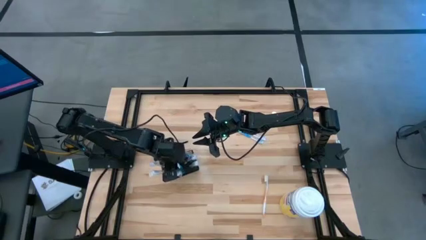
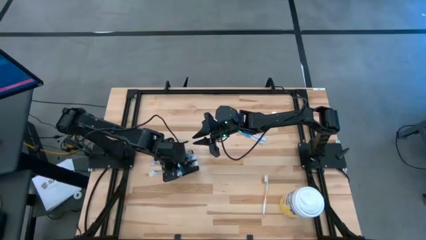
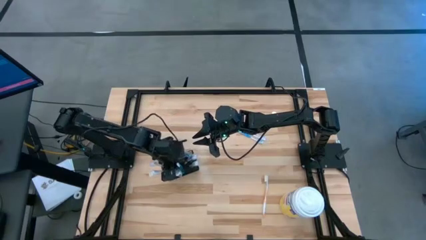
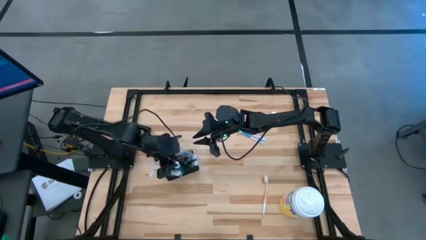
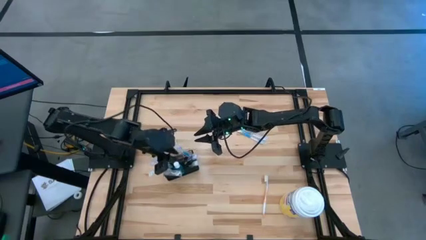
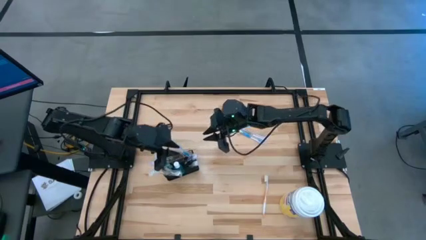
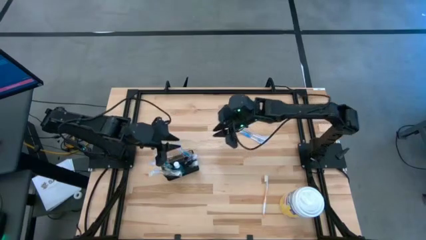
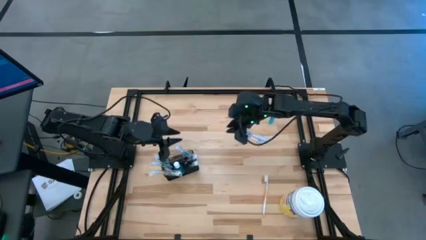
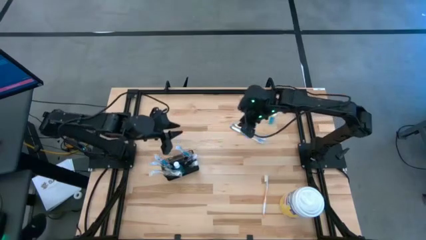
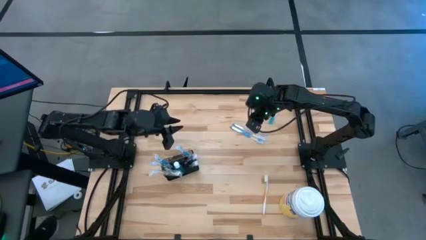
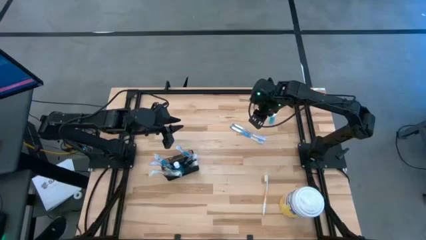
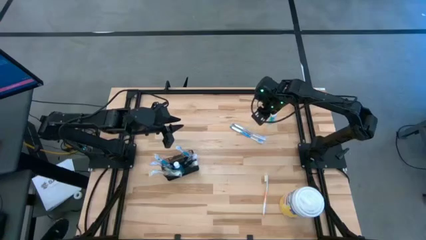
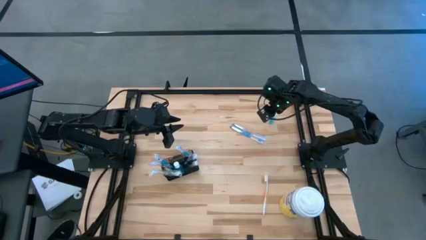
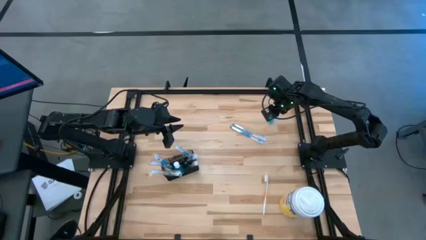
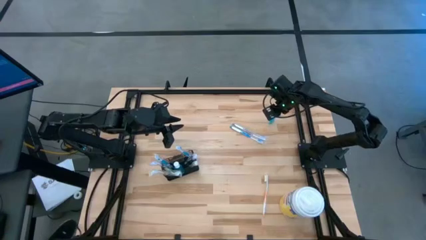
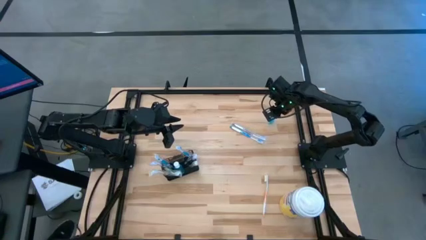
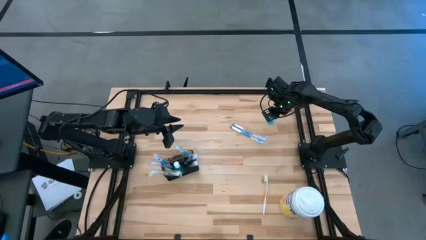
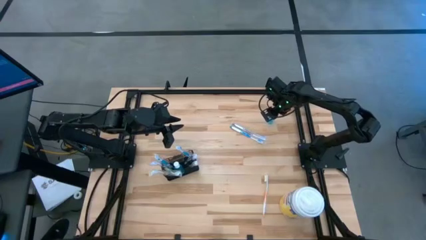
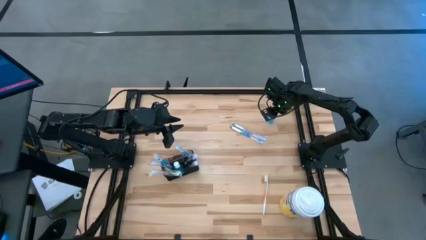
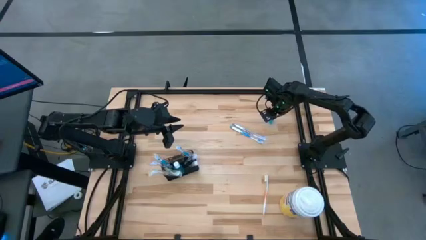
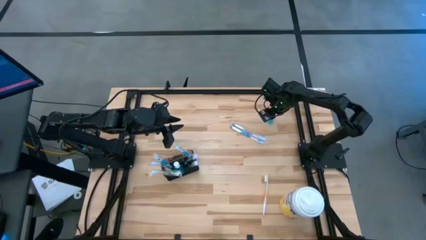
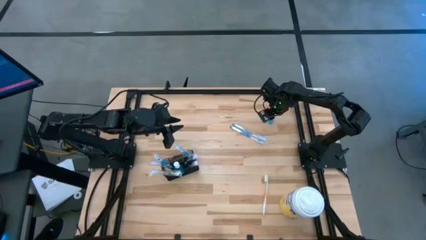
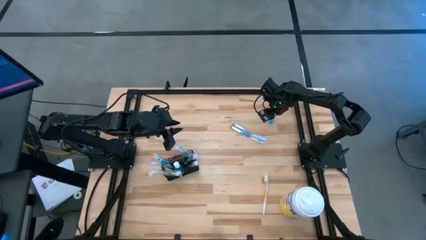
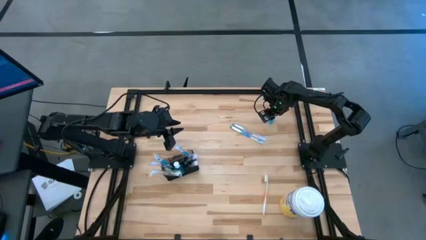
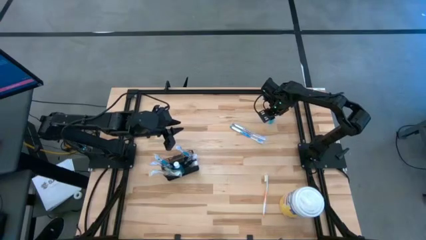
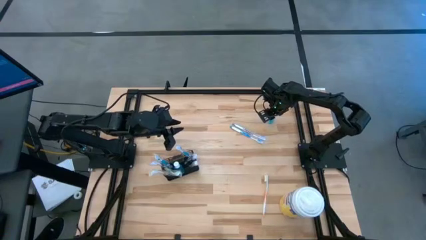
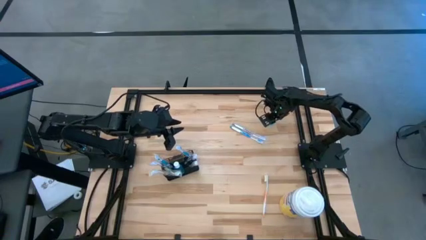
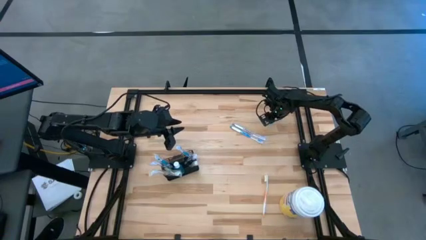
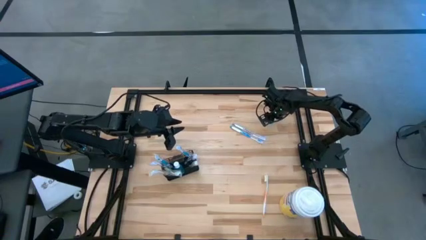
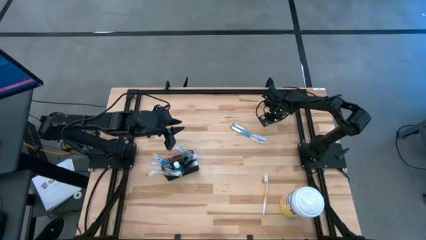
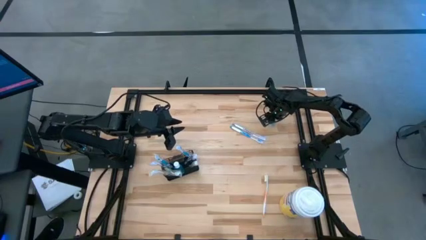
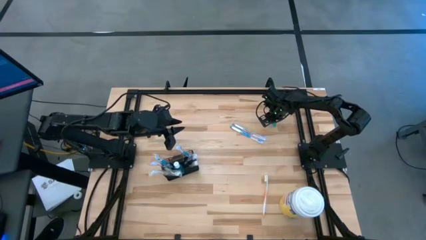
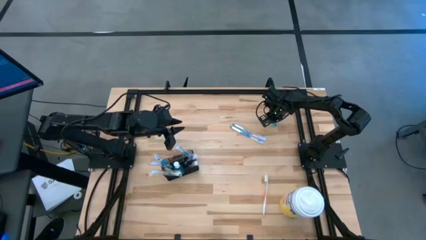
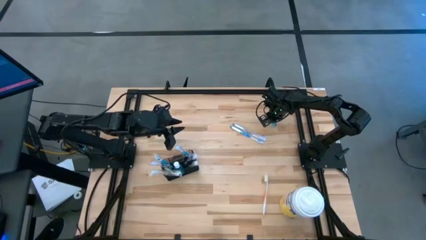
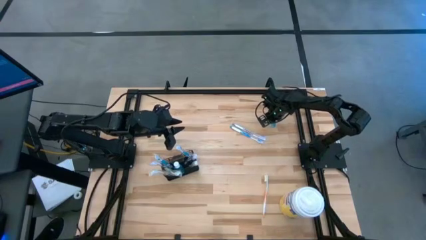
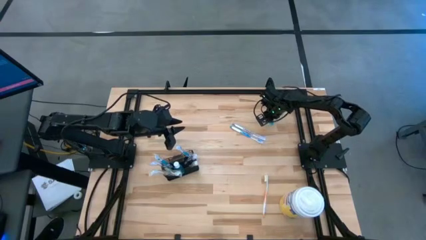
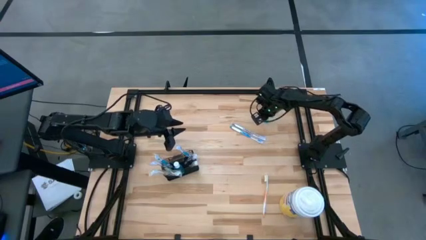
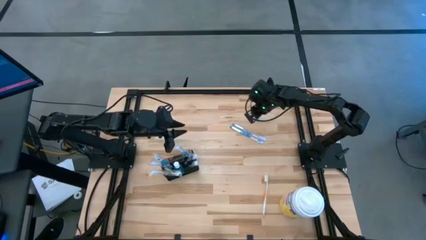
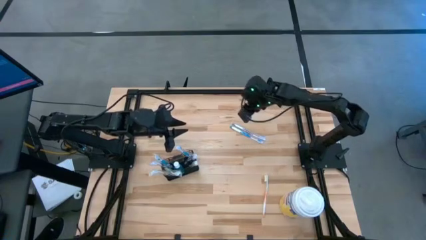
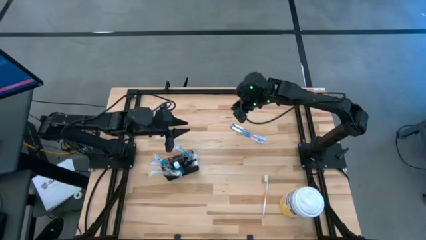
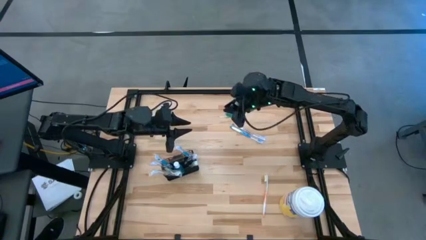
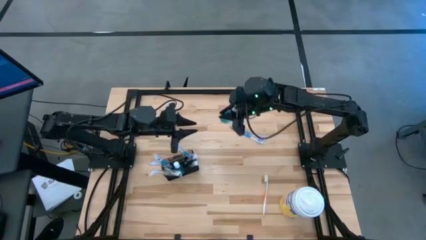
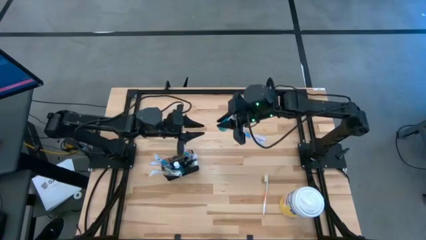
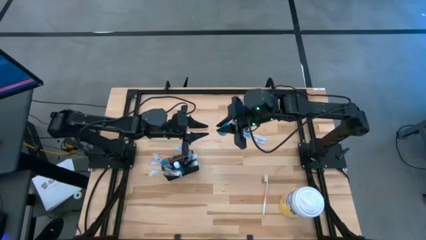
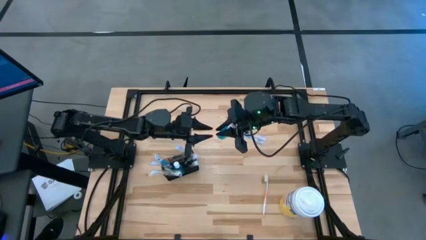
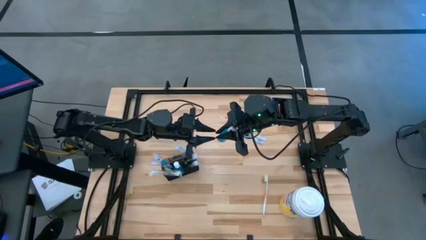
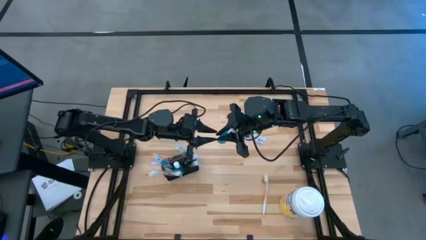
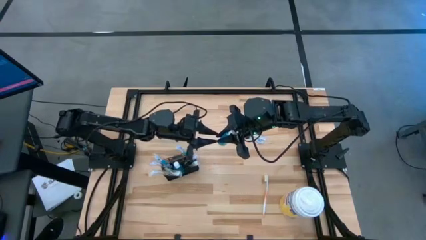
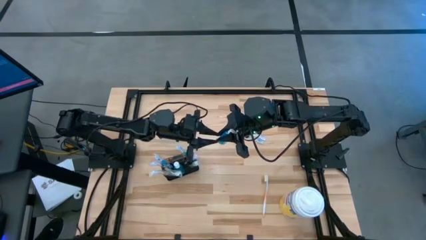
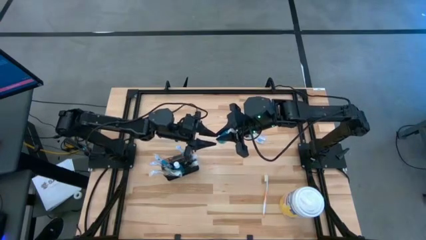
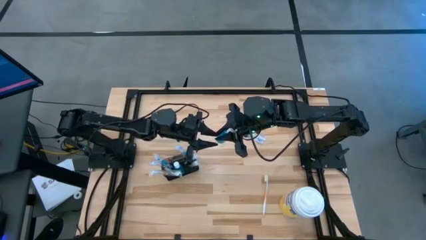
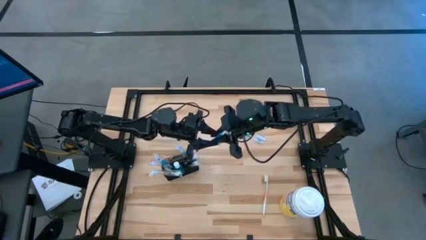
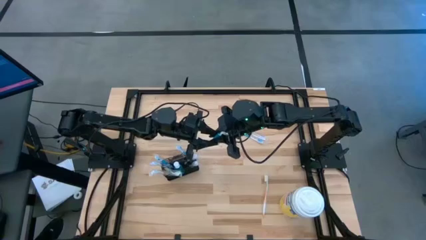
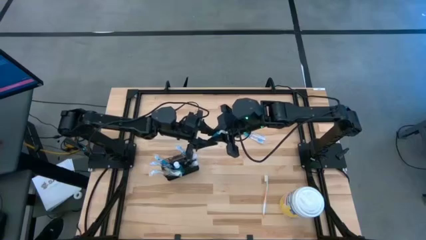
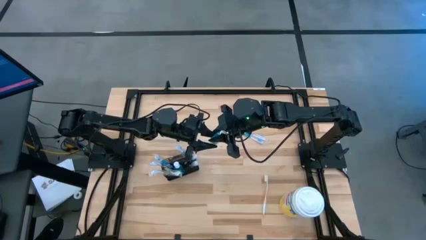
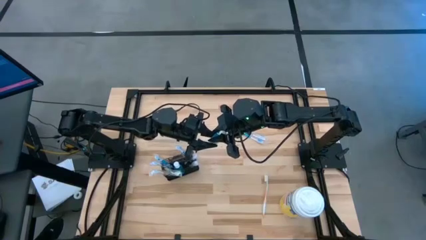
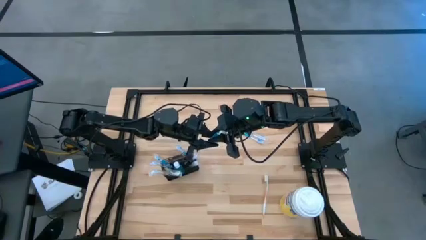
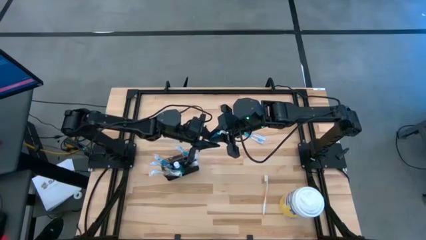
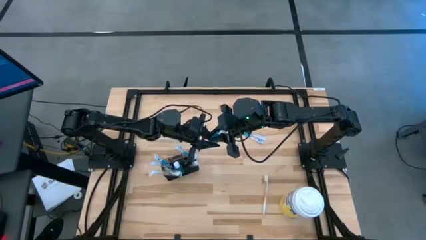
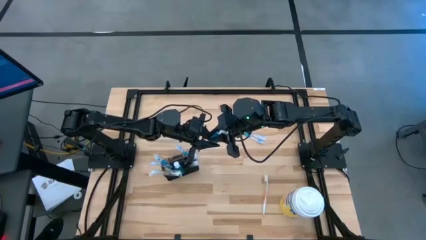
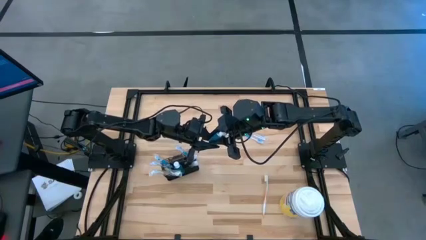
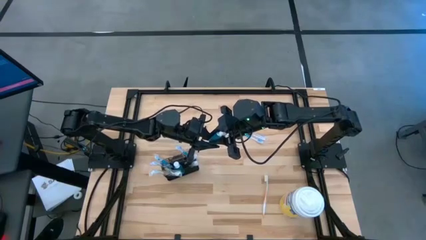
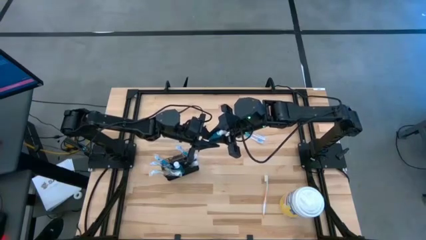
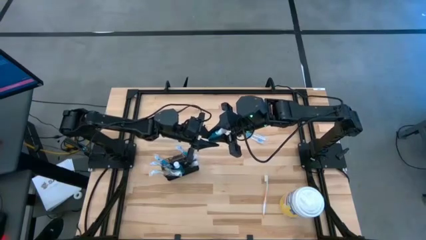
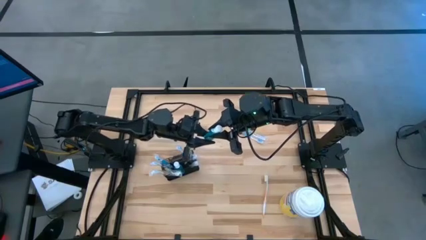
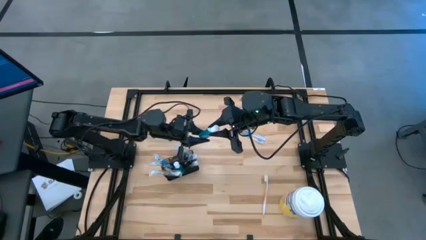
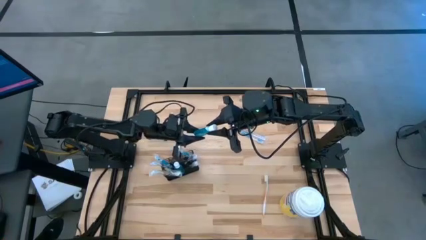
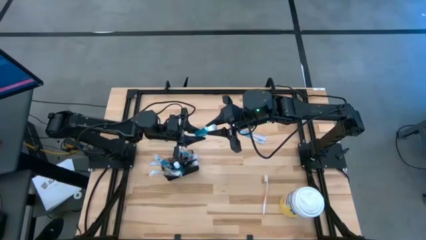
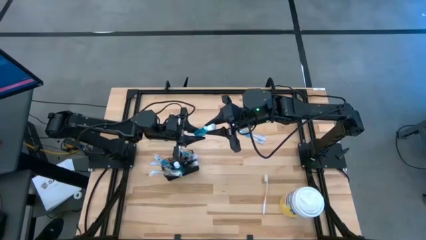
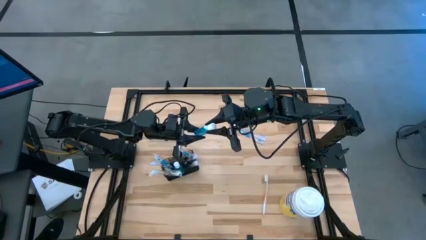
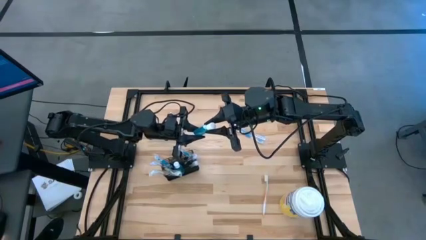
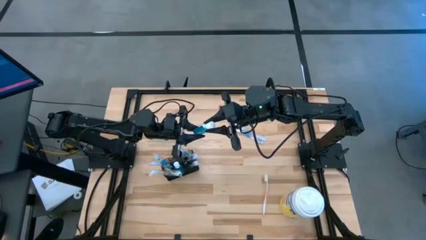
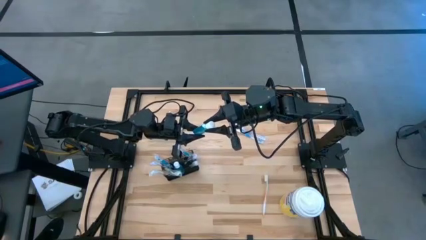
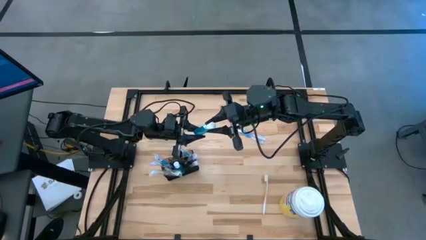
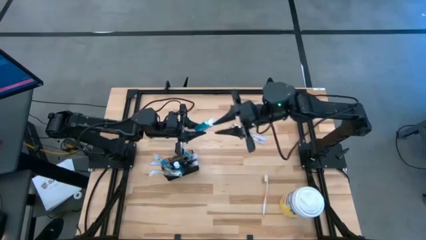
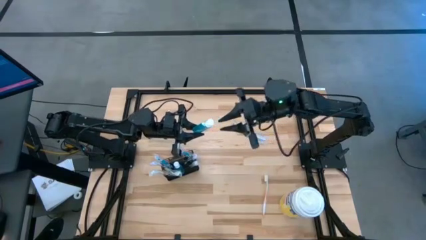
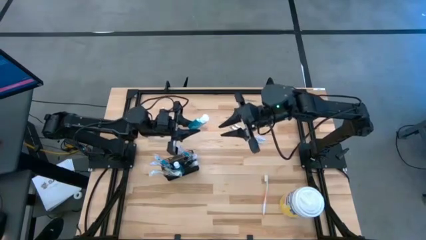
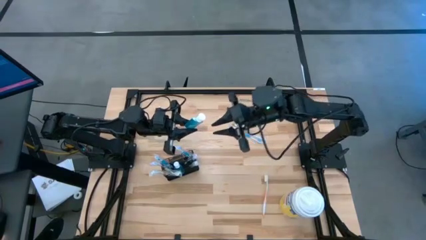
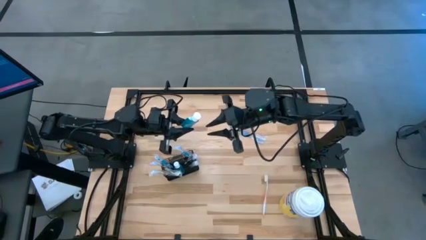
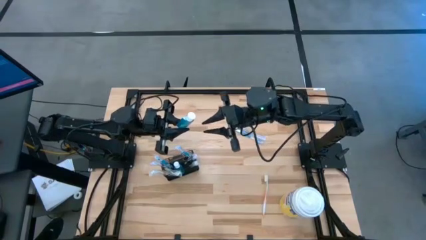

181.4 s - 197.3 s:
Task: Pick & Place toothbrushing station
Put the mouthwash into the middle section of the mesh organizer

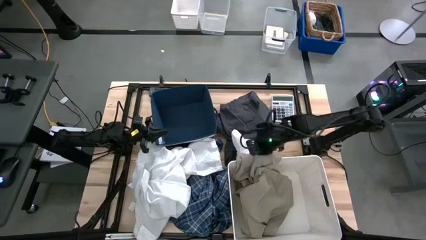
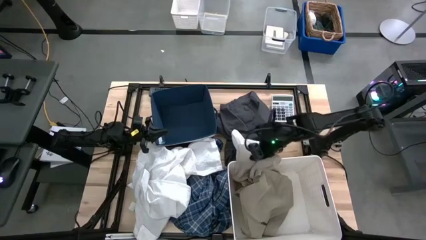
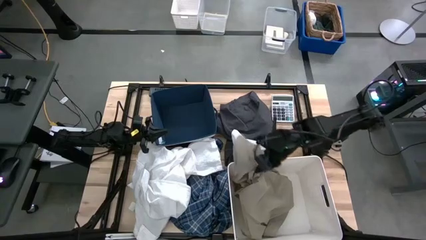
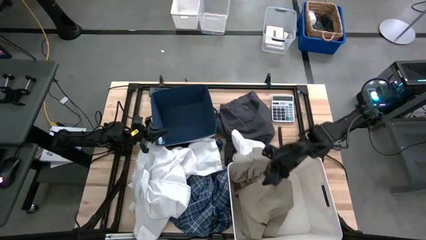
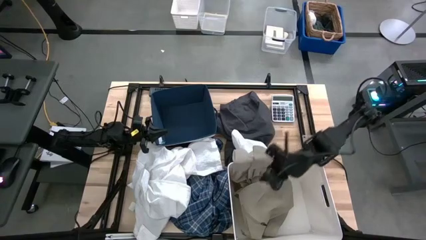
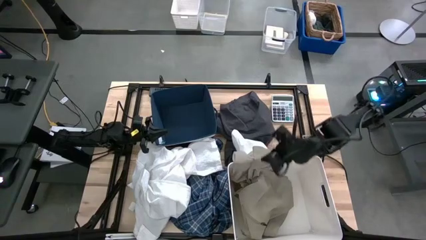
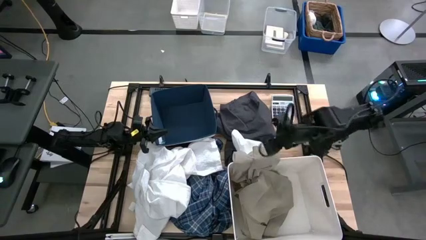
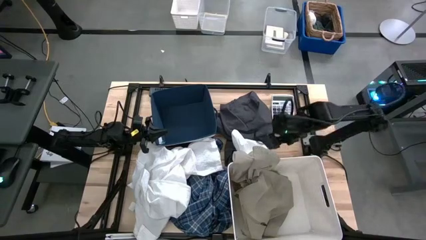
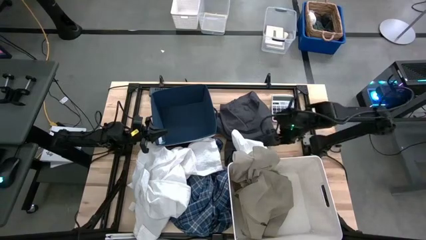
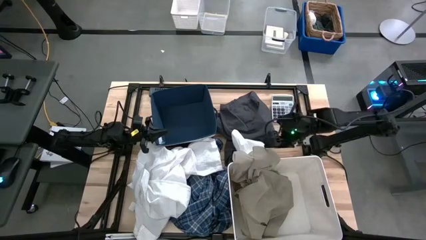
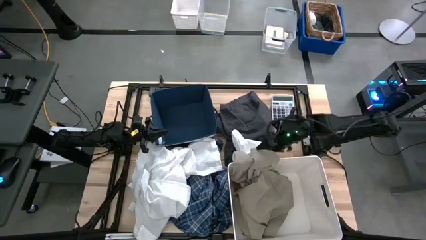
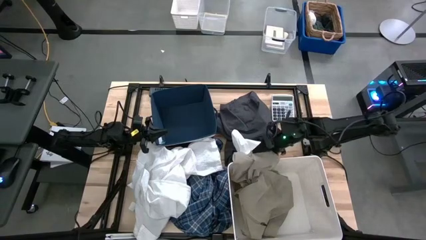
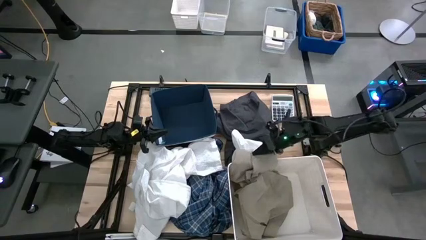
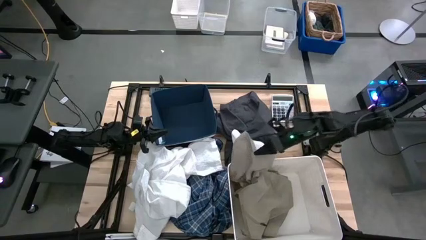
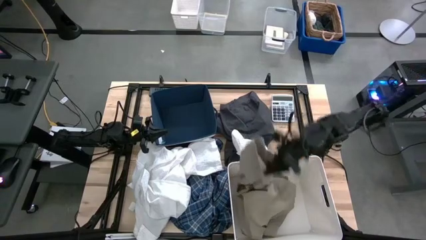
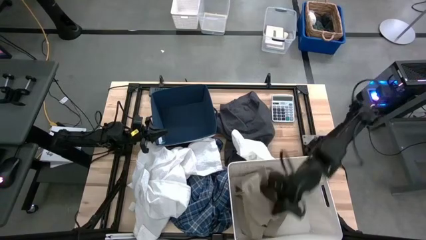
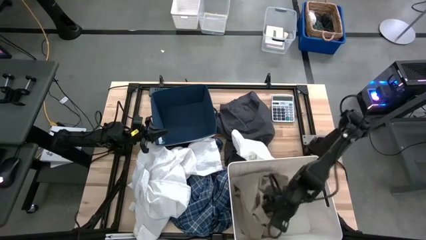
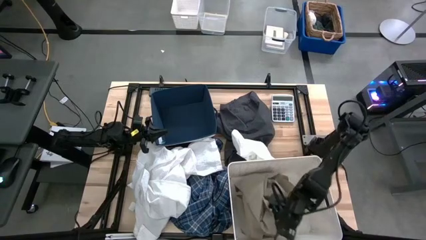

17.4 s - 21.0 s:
Task: Sort clothes
Put the brown pants into the white laundry bin
